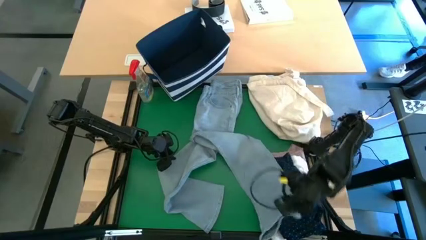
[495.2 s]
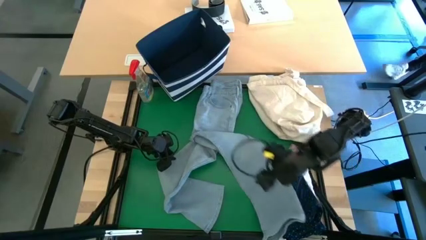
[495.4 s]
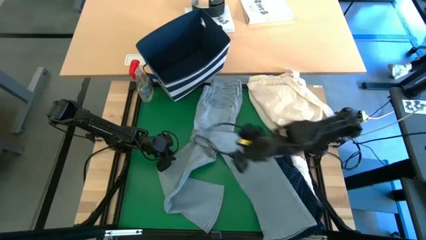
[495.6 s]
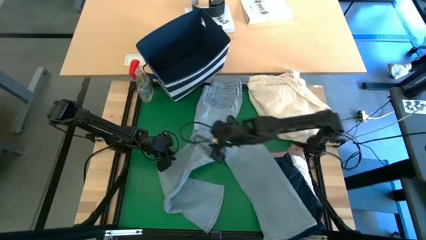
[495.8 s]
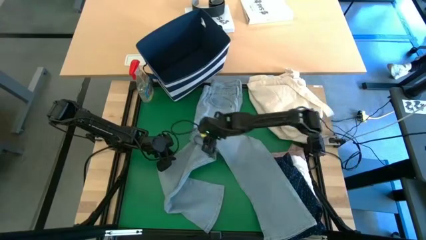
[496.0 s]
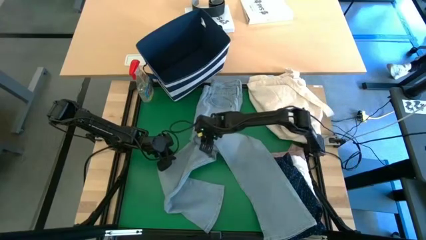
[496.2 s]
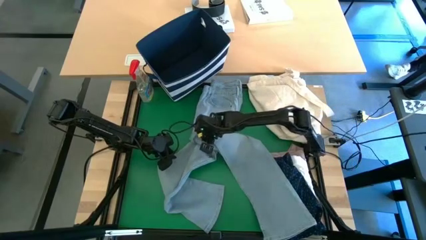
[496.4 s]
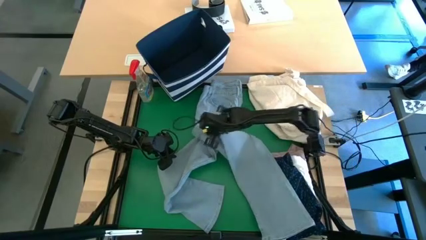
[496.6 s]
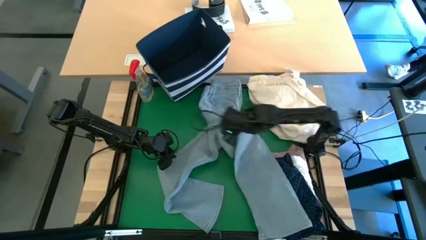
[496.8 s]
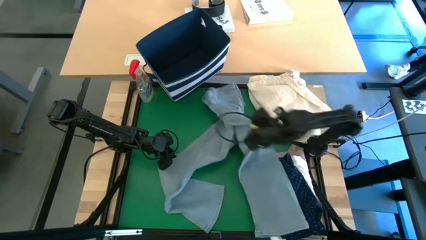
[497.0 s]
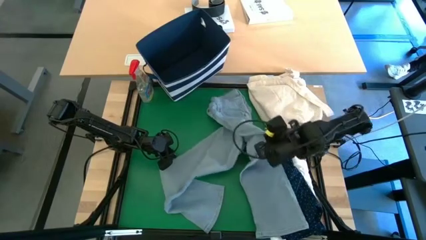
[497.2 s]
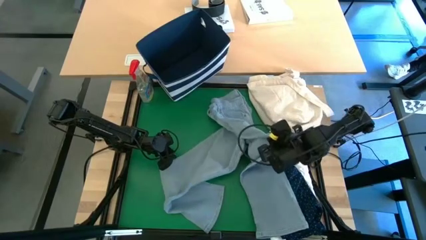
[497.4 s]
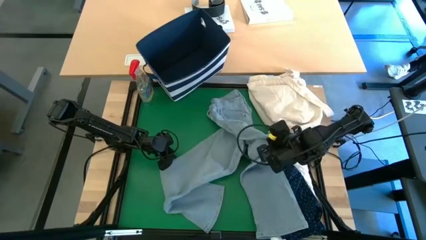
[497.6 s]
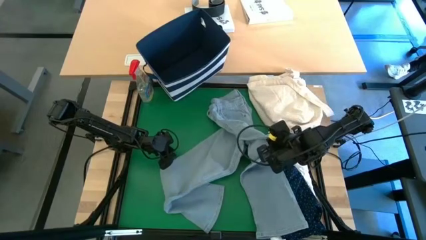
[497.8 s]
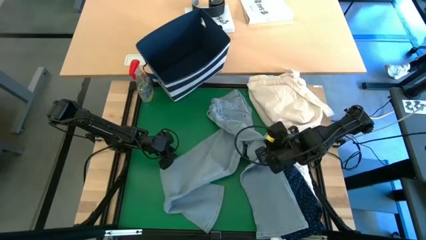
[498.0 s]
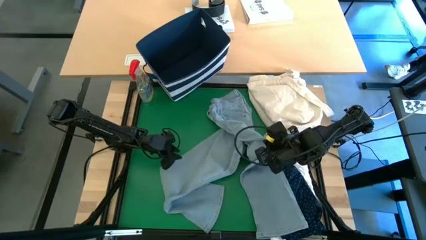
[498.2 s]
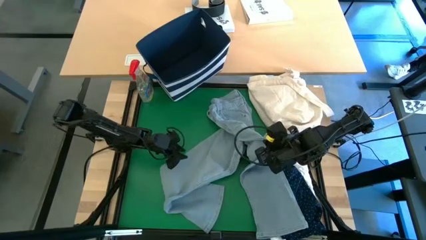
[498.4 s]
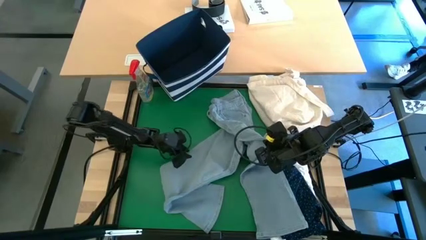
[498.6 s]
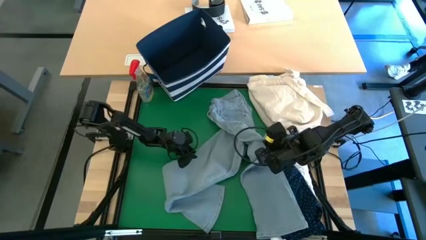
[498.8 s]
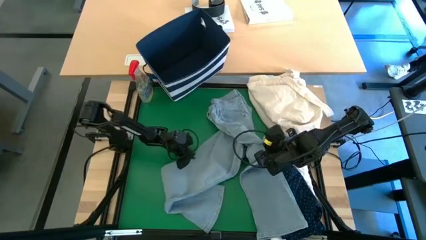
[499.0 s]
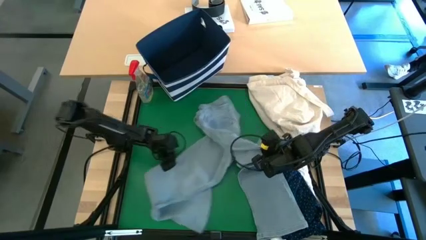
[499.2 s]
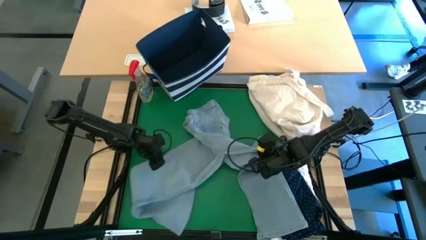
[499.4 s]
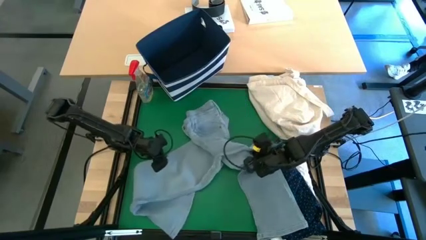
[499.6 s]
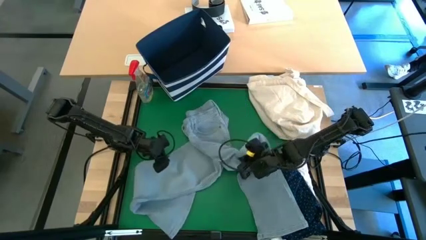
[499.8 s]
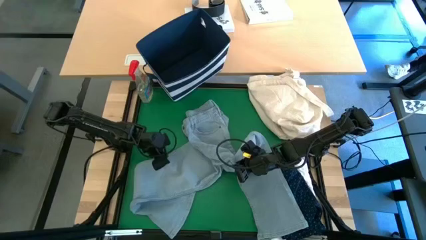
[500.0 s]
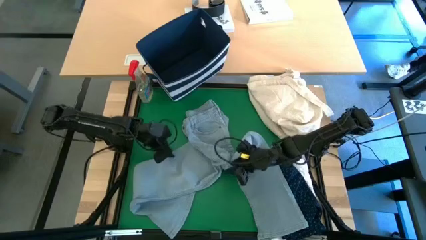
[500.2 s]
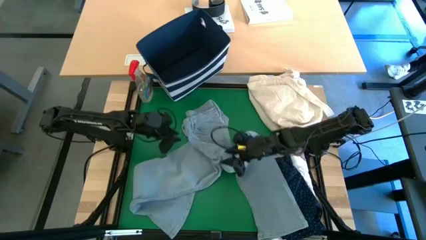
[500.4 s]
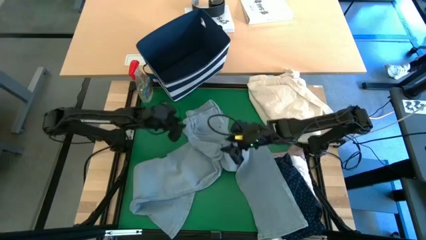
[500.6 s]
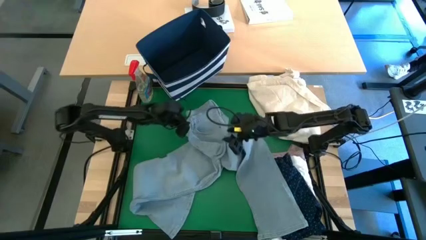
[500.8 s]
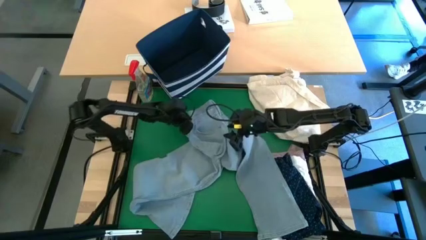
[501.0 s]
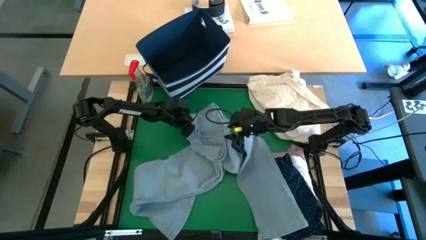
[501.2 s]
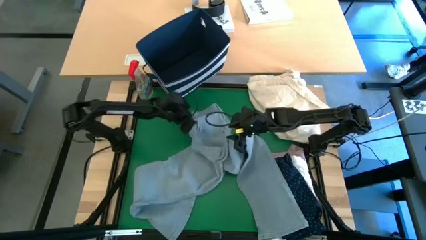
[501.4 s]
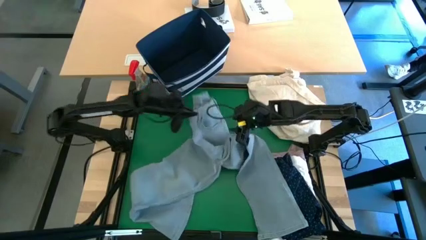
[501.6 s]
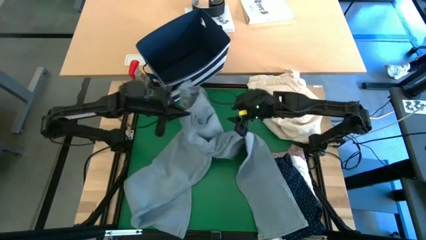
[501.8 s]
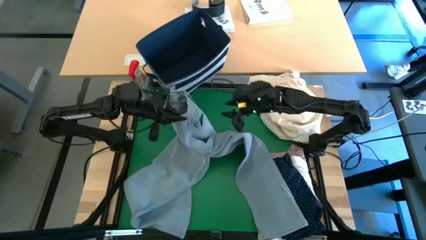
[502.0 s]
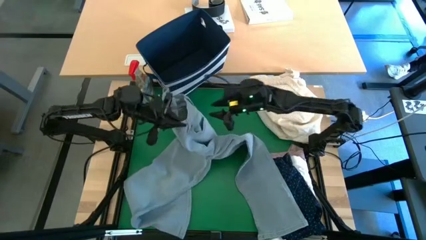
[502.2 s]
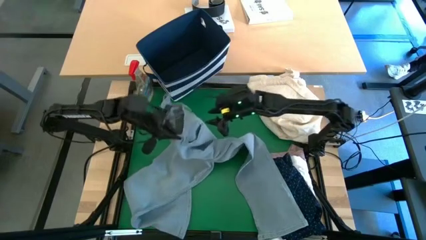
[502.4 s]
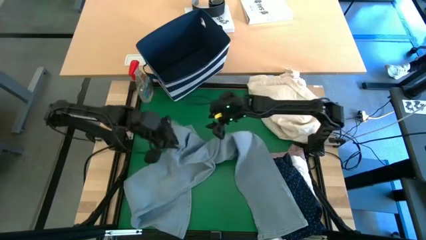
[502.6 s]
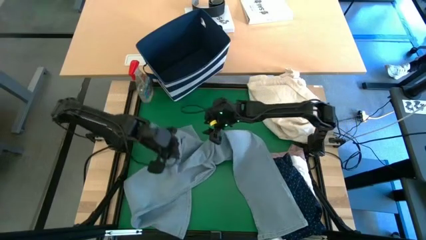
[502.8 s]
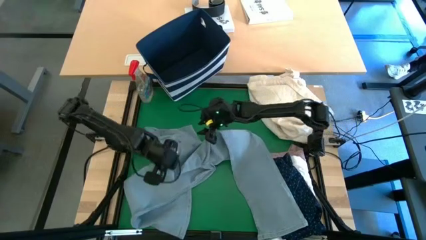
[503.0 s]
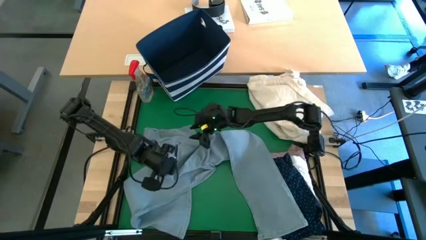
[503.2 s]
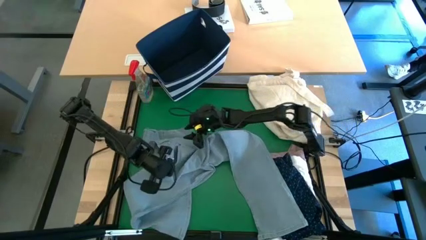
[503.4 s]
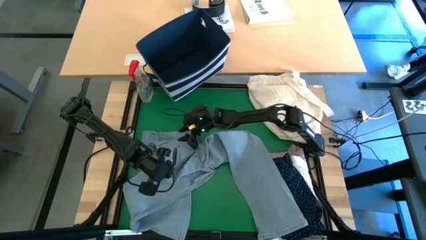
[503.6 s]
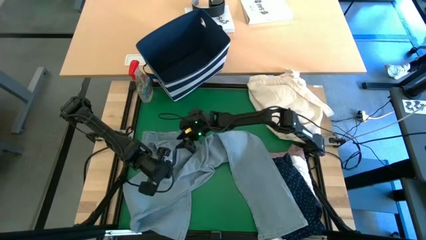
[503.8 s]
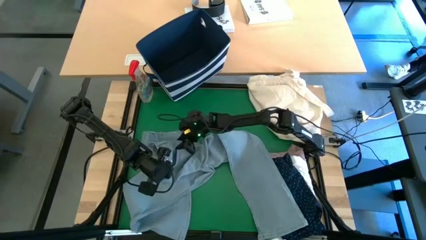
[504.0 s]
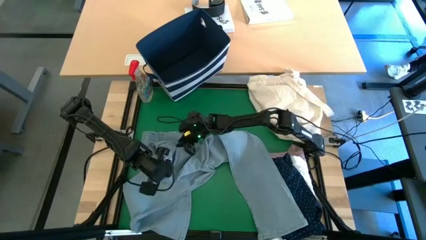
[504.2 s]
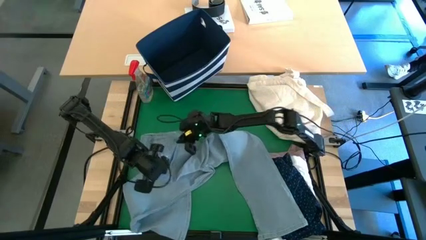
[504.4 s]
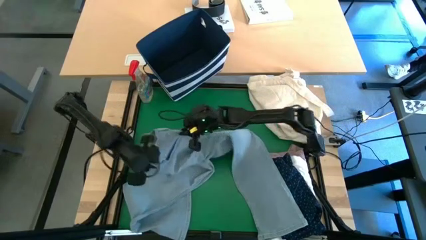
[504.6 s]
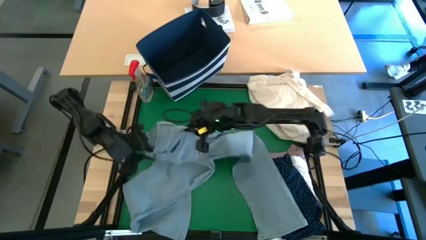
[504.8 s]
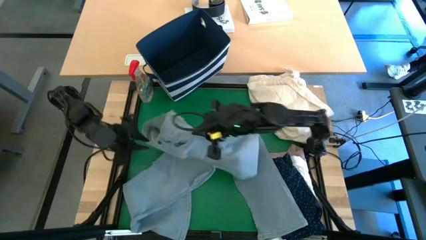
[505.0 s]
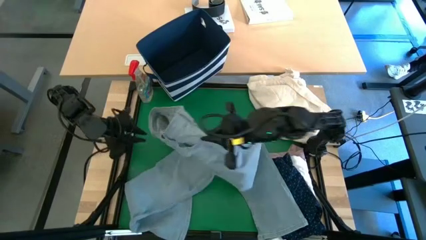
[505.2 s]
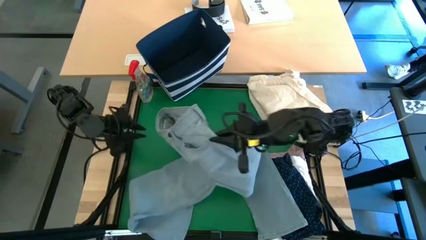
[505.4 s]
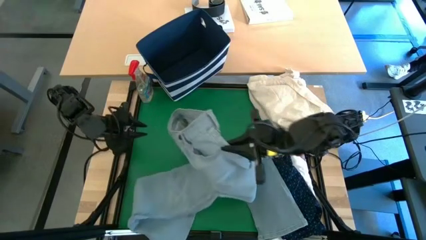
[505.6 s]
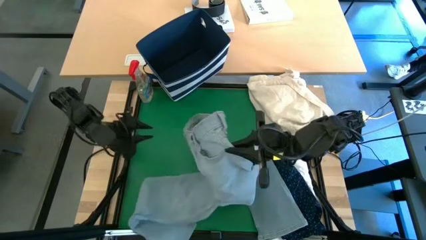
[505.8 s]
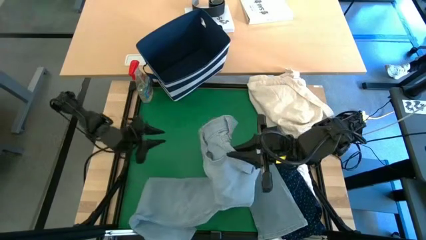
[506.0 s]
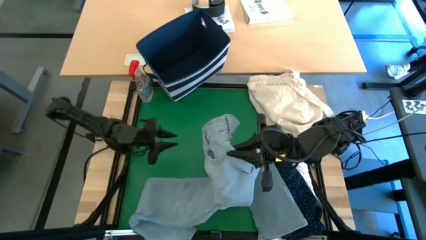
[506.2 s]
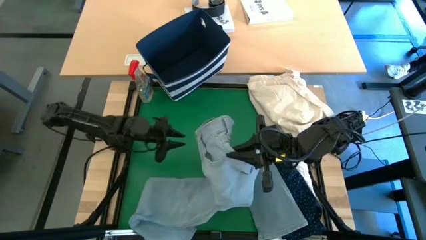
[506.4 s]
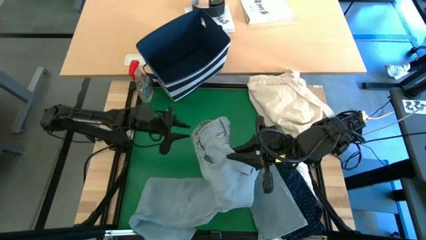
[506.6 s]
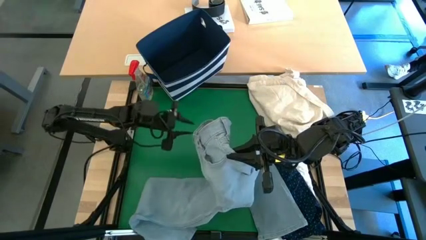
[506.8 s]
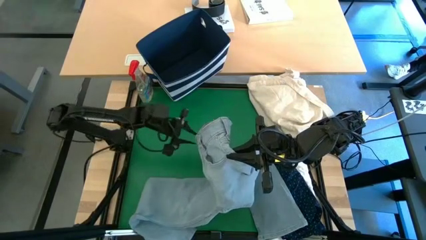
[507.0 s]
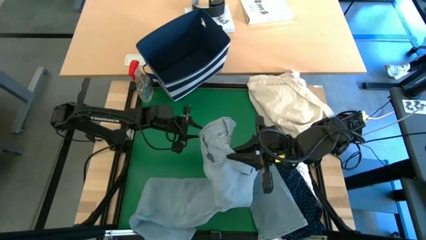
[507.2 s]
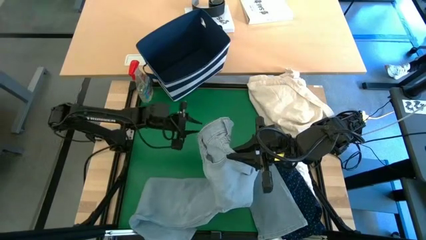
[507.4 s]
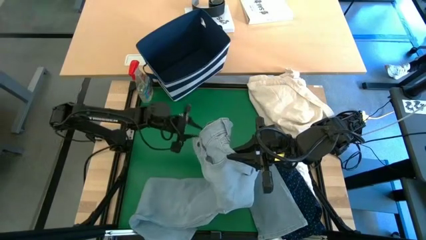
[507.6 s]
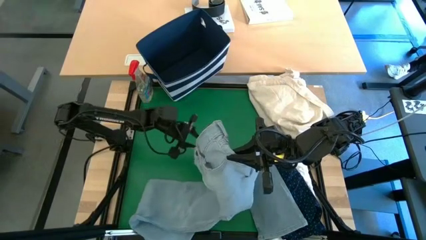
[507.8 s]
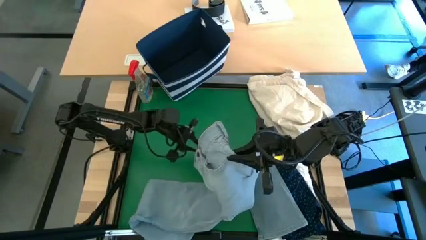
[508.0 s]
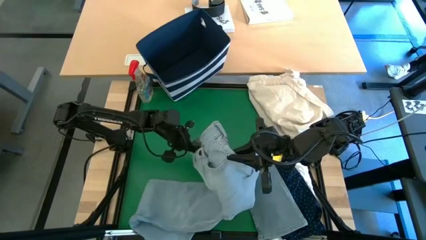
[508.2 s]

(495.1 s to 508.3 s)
Task: Fold laundry
Fold the blue jeans

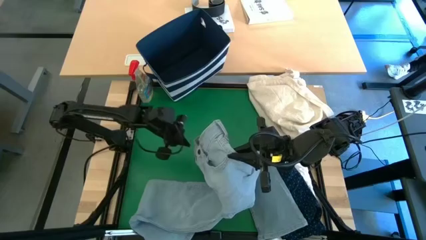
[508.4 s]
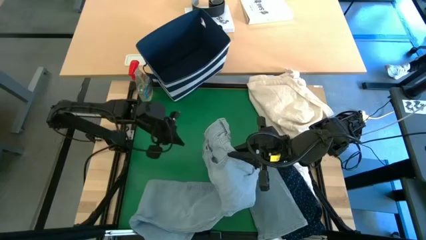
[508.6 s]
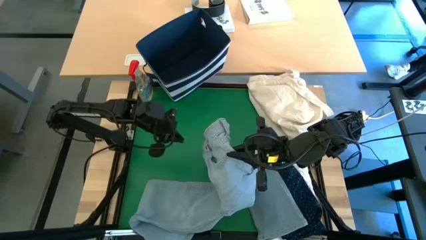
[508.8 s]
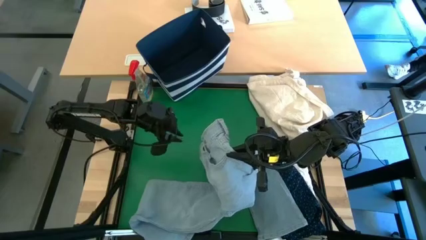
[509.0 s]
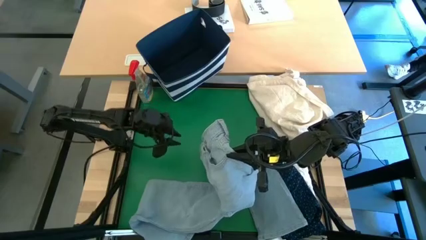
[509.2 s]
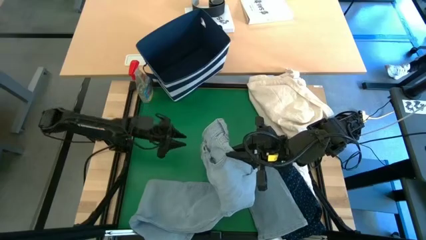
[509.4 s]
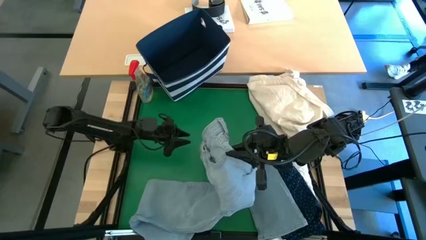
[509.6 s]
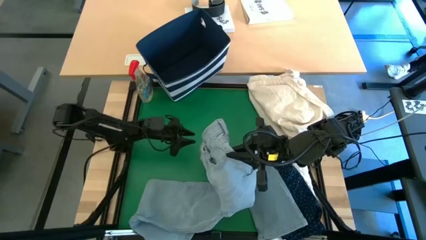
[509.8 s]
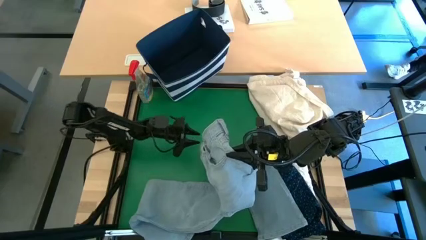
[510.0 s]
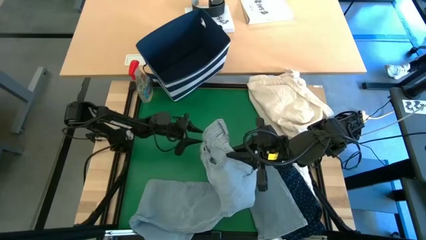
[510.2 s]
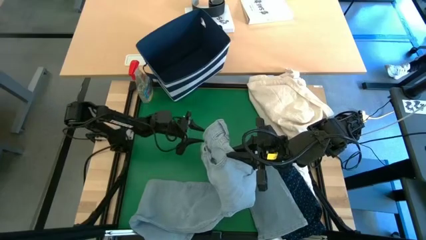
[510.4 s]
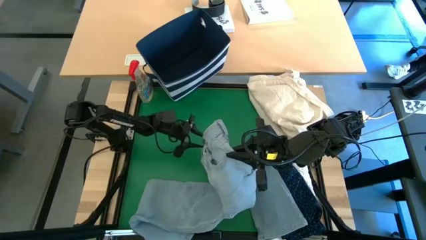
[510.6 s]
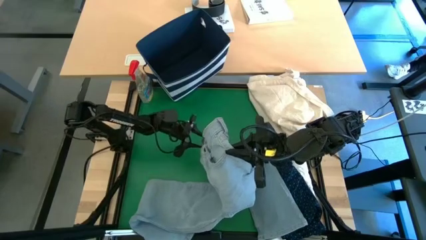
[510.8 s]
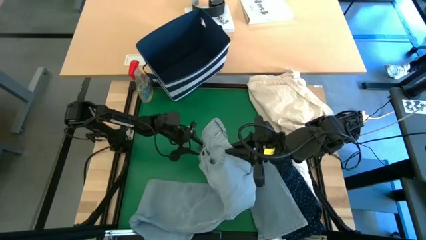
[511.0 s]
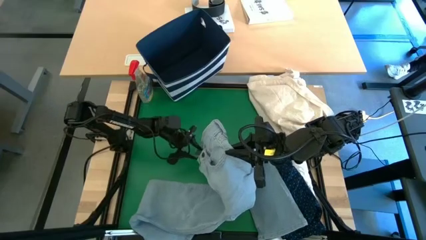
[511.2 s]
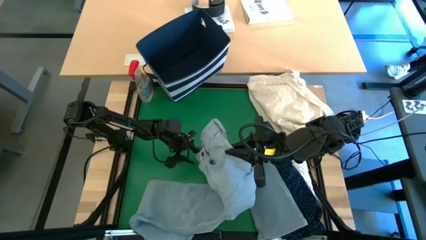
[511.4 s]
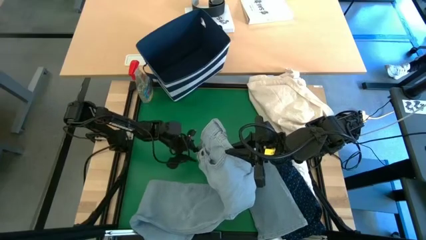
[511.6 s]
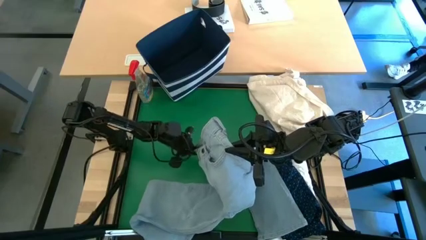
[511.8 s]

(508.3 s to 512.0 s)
Fold the blue jeans
